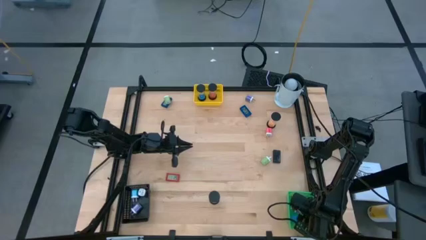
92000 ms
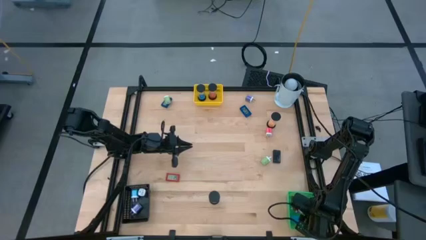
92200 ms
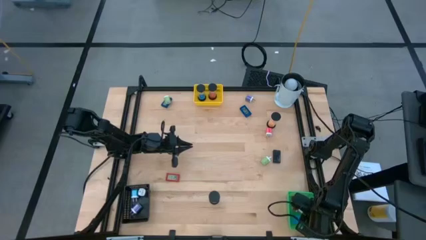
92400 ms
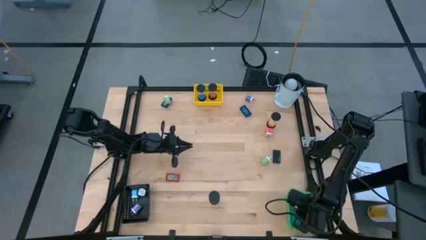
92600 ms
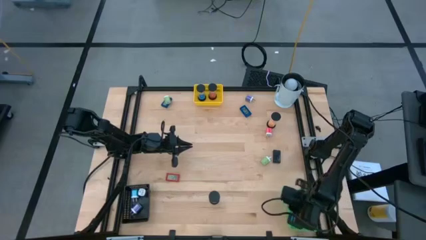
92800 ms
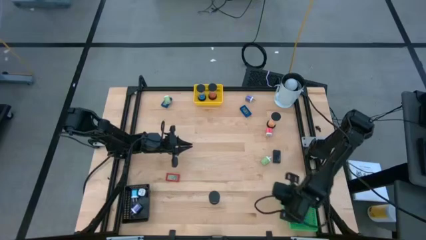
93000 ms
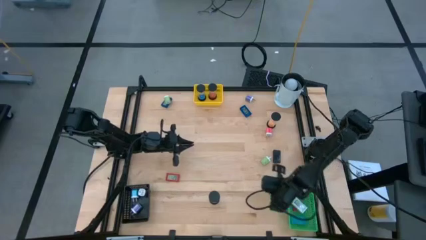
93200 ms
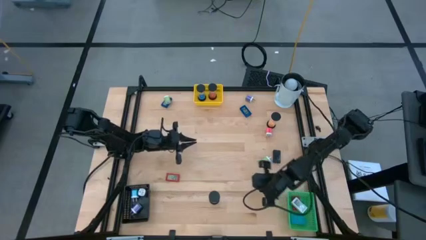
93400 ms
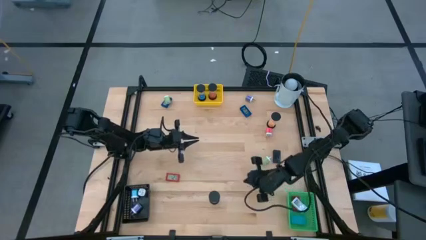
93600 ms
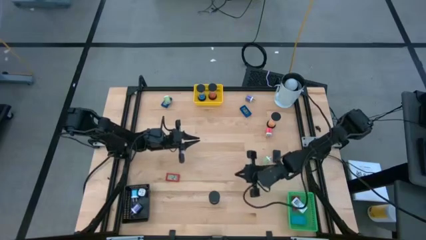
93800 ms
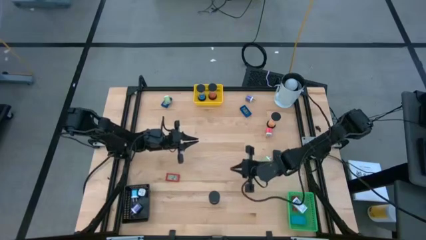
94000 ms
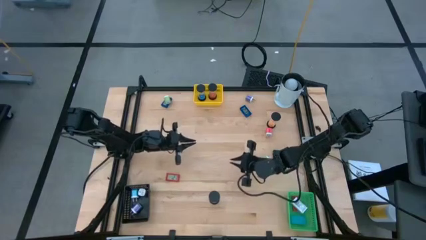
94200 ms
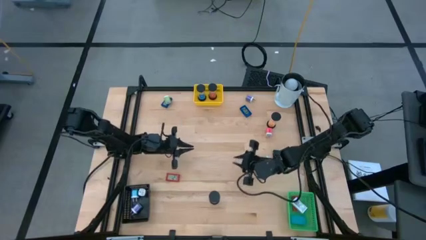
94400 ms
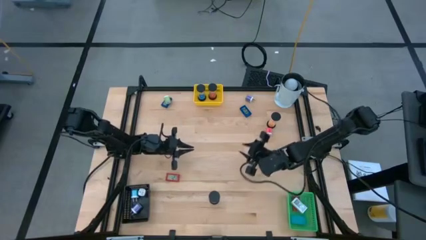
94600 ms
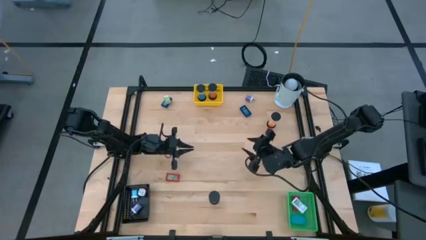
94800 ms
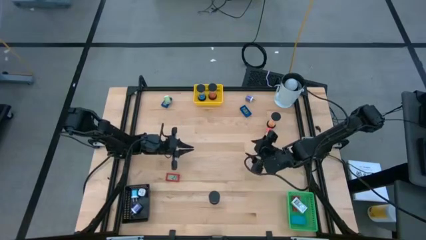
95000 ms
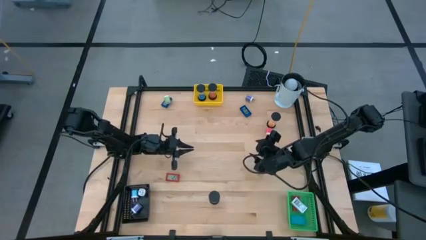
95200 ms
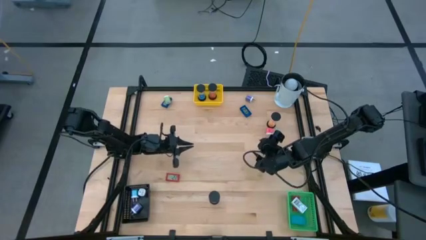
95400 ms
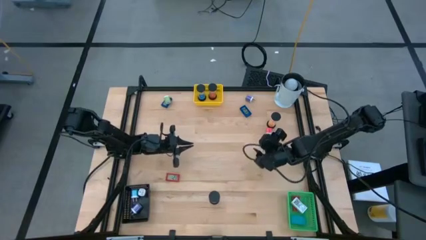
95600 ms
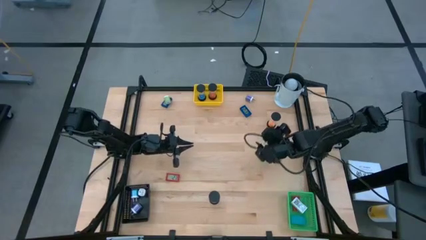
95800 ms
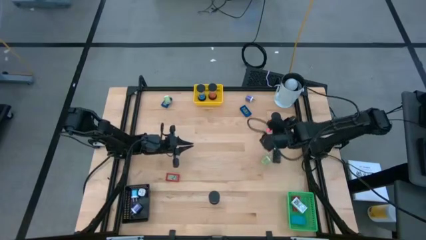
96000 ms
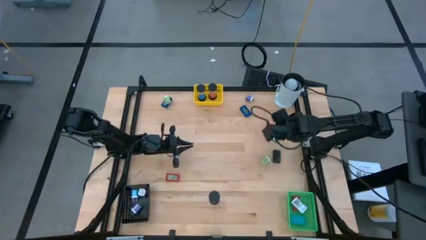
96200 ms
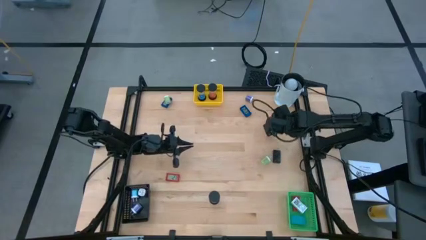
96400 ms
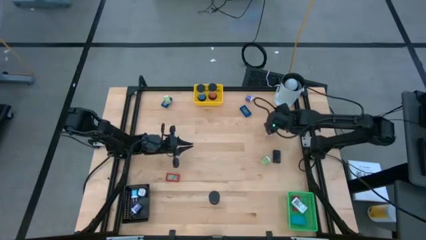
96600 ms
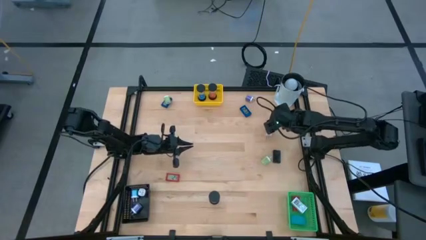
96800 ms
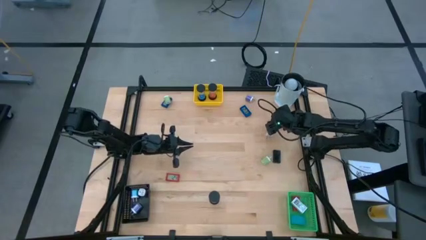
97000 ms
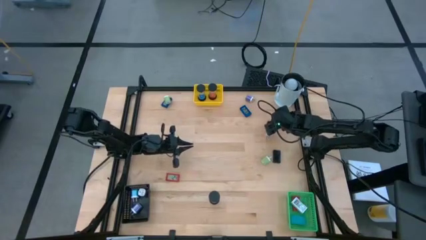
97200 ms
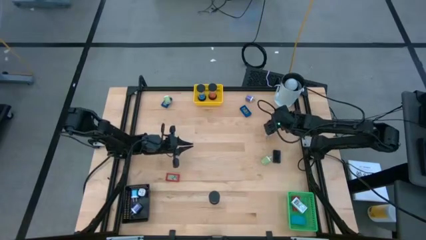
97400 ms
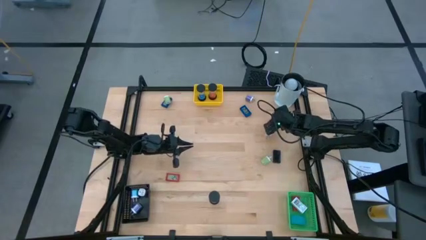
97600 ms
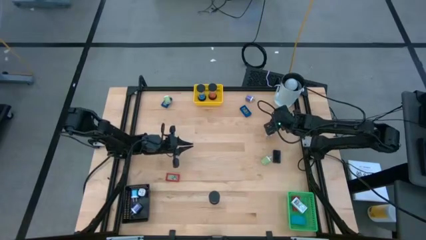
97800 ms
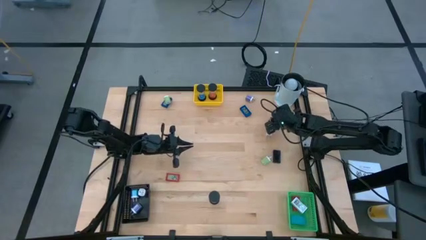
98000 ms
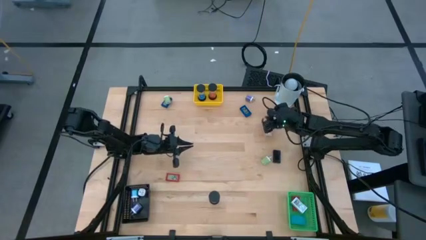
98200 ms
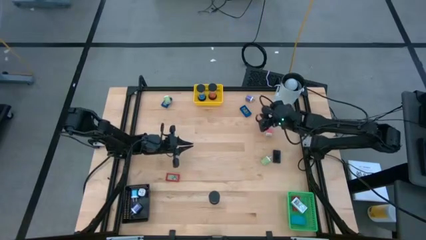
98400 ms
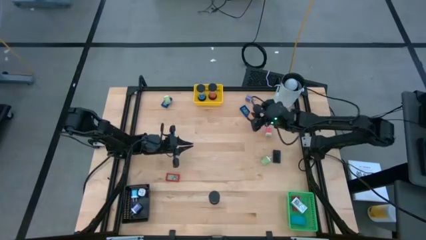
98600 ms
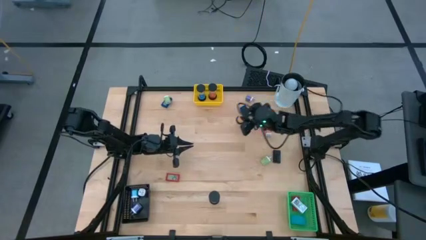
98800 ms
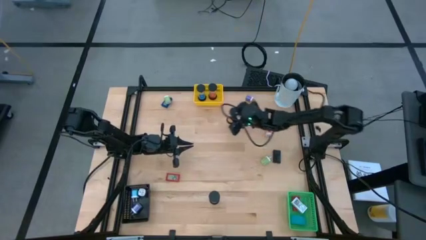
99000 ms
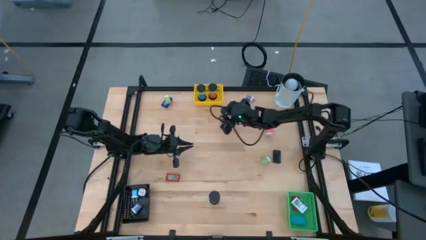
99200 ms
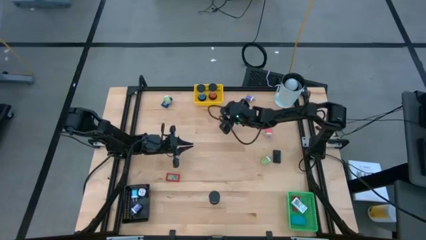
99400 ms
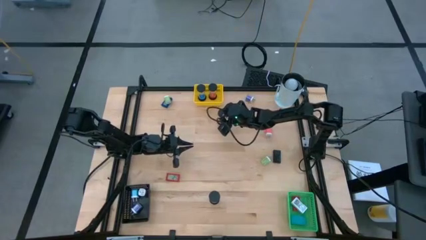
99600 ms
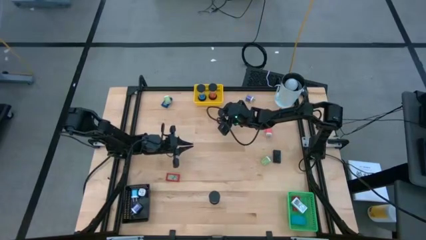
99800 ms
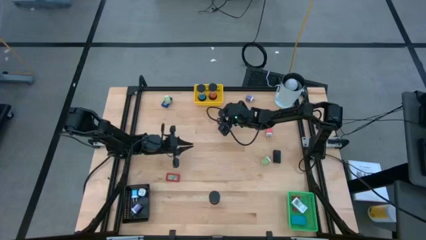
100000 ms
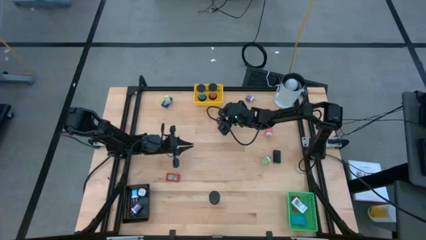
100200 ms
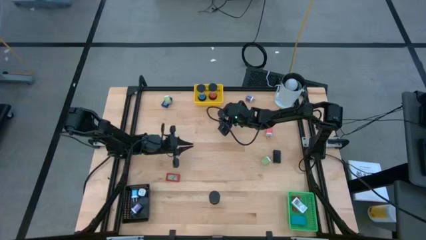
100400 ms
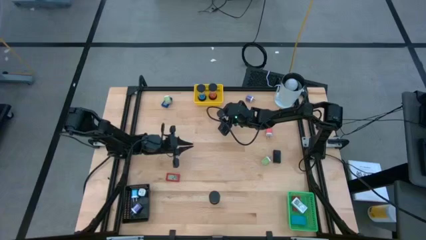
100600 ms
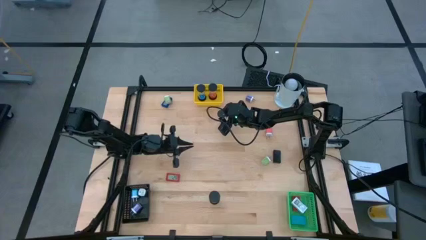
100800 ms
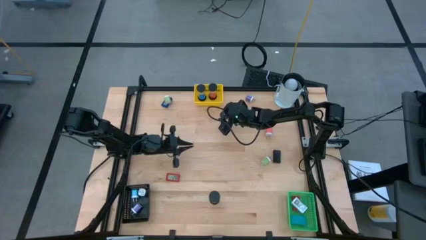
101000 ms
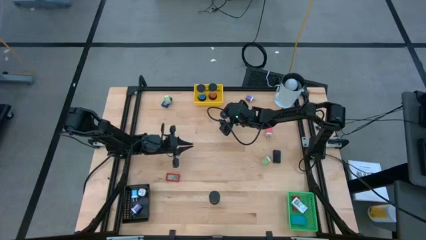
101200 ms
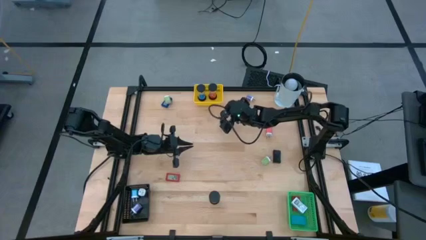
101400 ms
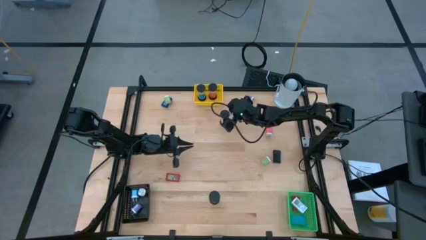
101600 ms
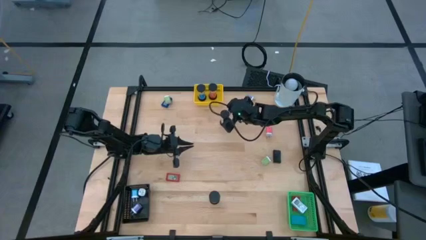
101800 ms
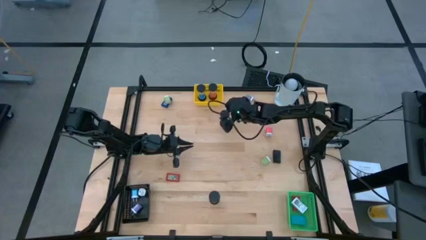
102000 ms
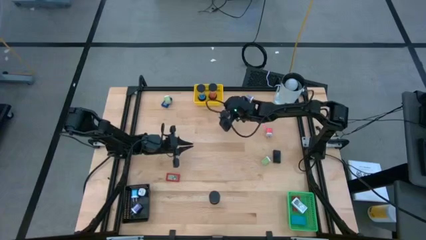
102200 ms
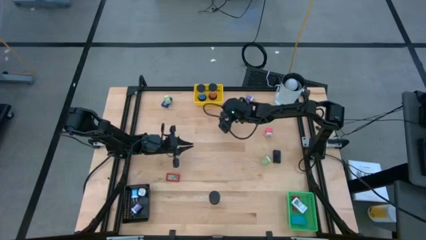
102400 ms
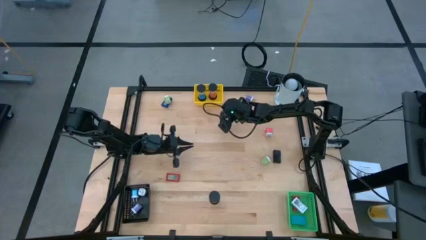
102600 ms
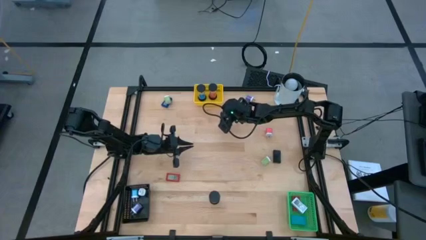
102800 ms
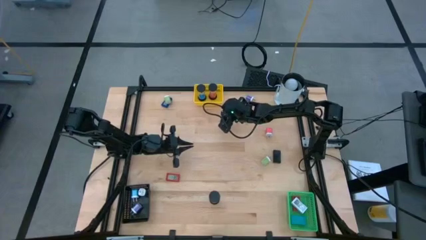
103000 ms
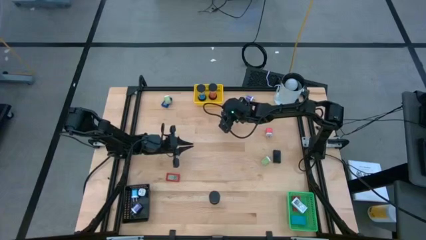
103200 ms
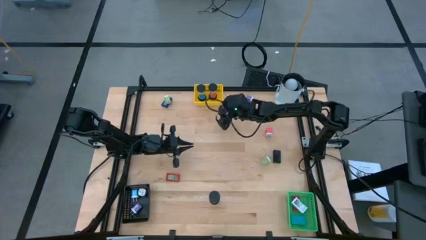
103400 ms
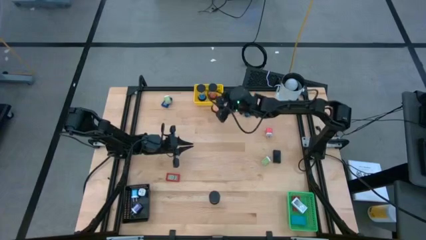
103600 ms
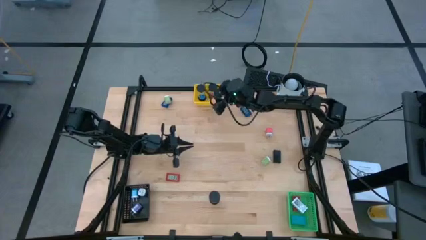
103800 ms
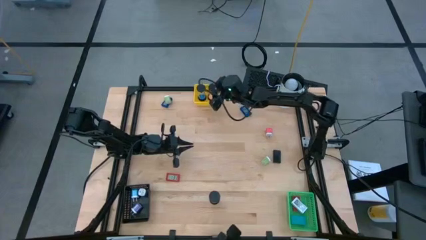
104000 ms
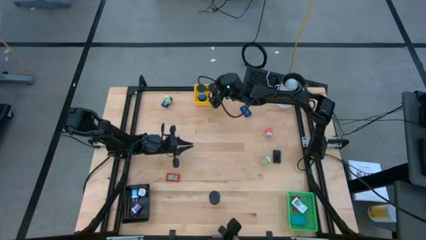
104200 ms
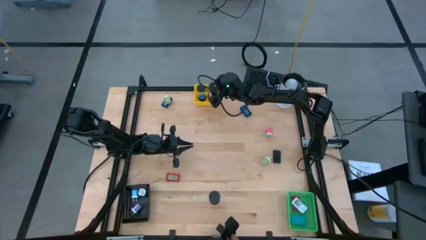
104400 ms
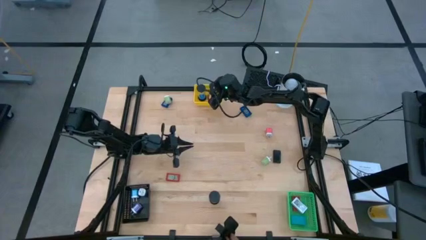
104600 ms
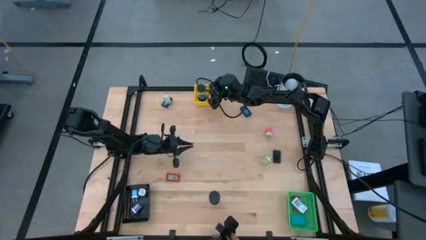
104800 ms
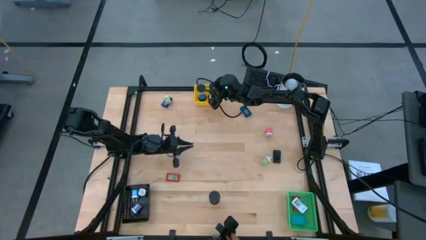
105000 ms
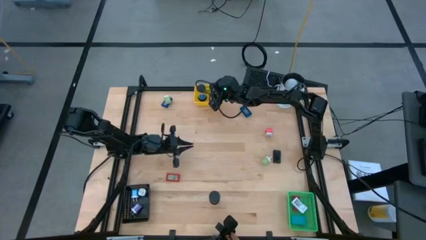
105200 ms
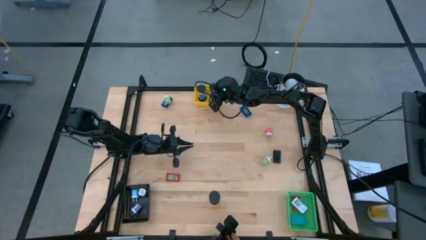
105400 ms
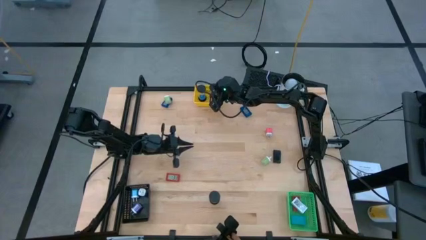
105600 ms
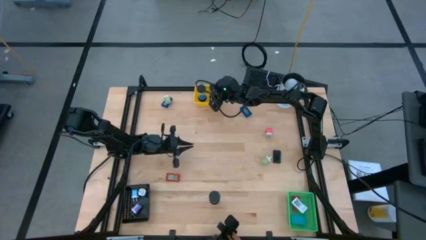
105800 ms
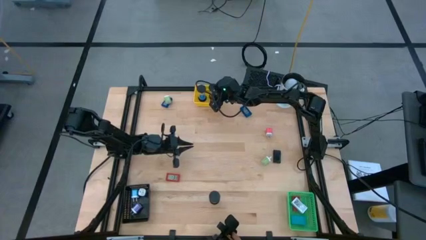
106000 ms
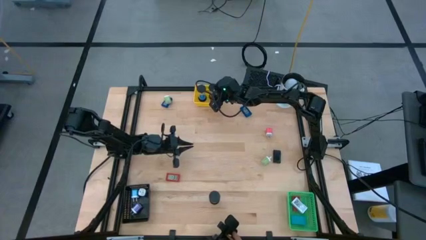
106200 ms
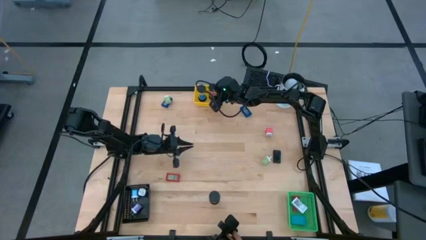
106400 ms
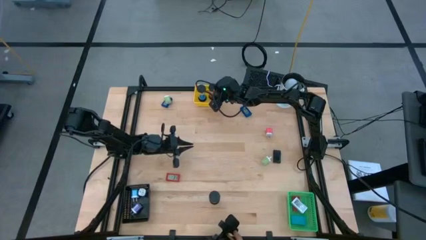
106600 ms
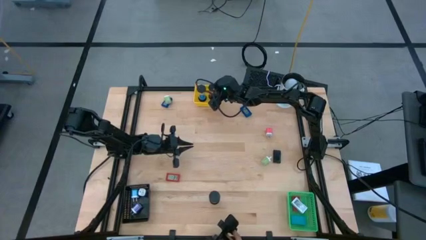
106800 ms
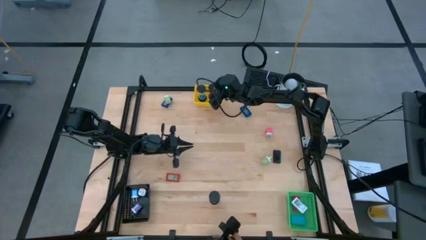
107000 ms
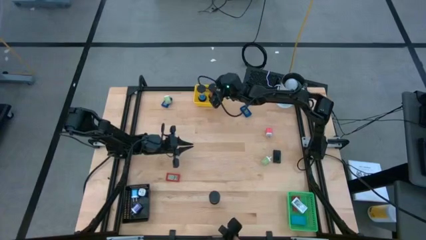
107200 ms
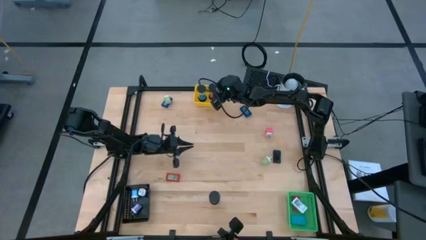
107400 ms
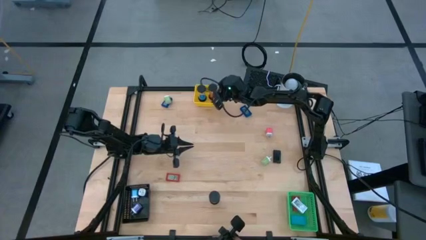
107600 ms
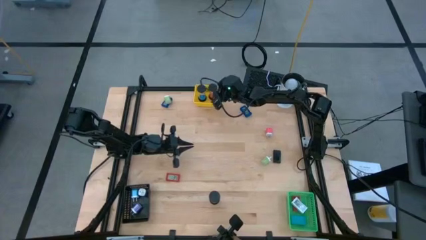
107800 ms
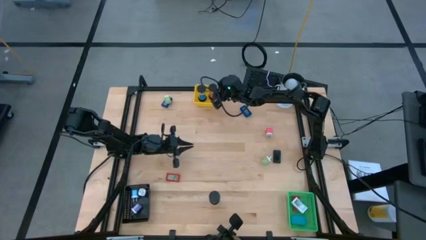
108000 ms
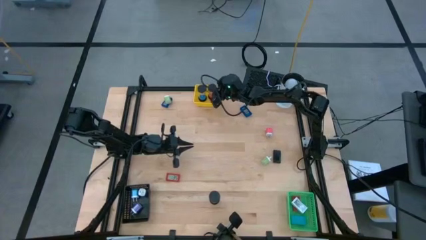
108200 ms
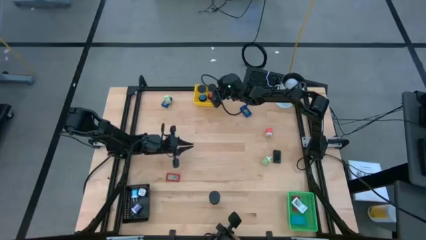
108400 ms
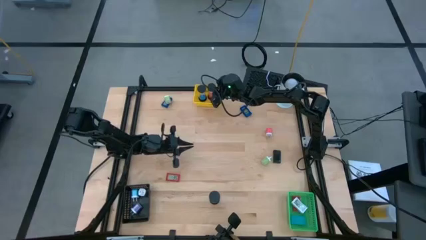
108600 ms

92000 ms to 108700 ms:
Task: Pick & Place Office items
Put the orange hour glass into the yellow bin
